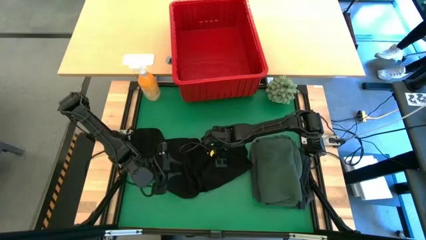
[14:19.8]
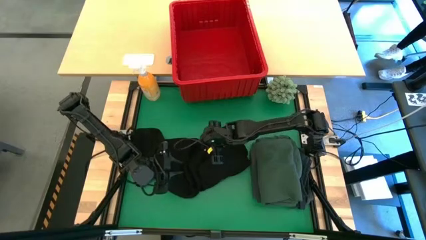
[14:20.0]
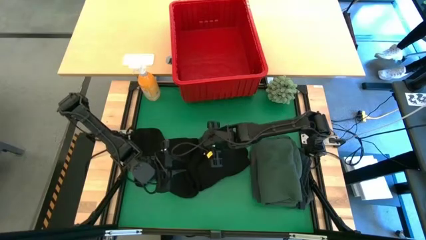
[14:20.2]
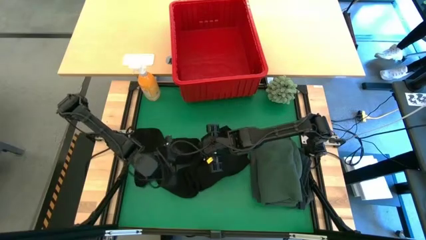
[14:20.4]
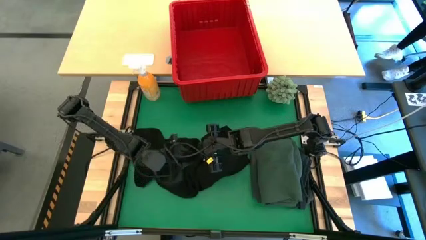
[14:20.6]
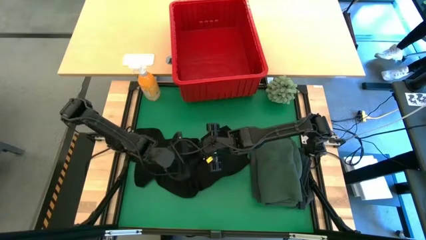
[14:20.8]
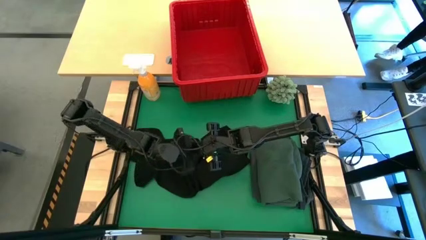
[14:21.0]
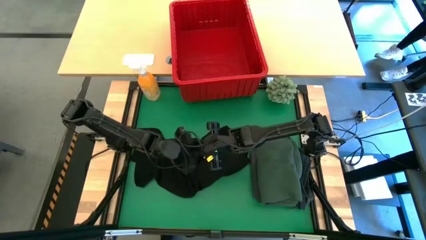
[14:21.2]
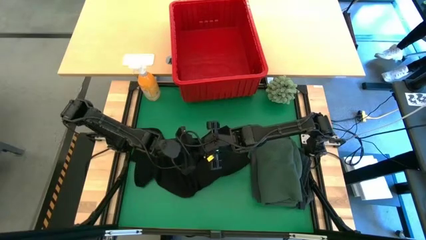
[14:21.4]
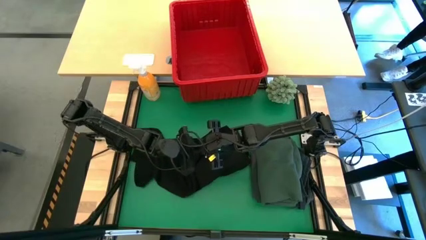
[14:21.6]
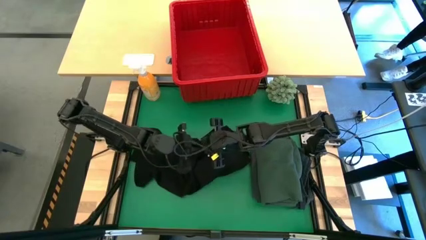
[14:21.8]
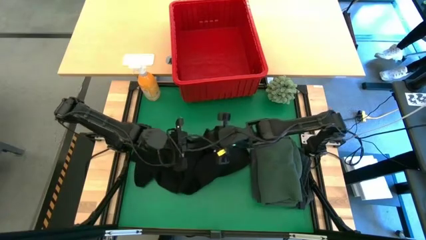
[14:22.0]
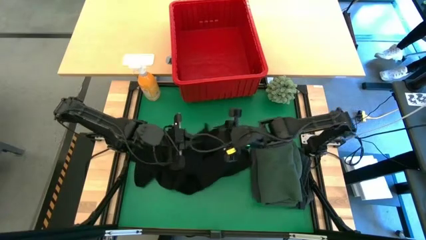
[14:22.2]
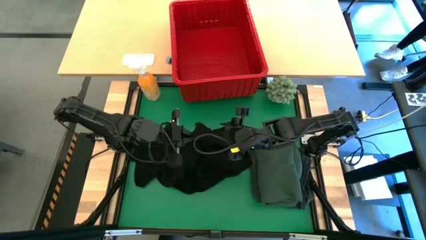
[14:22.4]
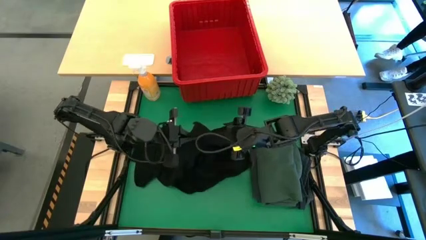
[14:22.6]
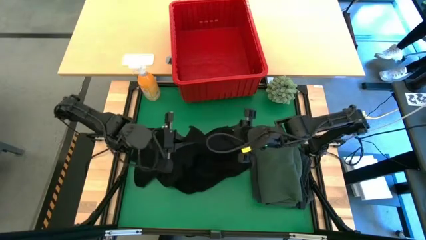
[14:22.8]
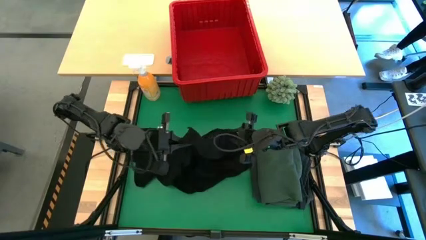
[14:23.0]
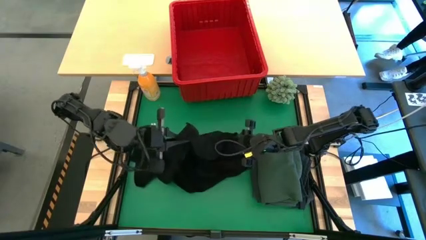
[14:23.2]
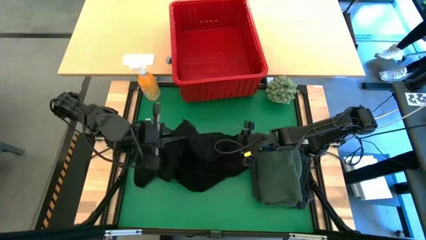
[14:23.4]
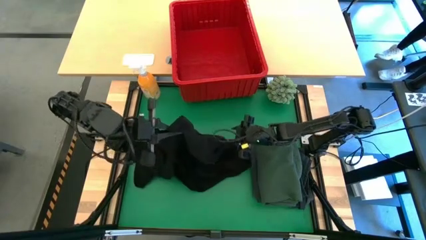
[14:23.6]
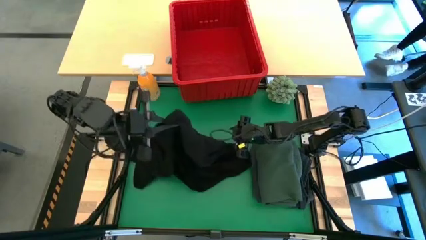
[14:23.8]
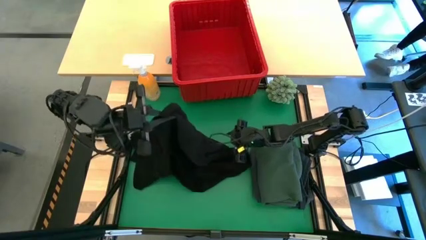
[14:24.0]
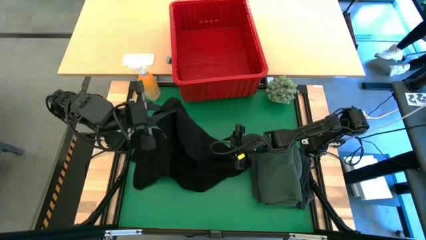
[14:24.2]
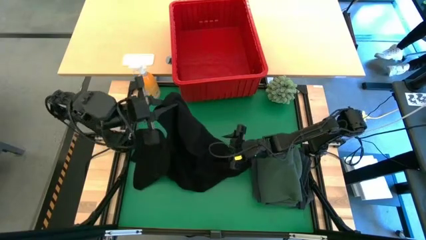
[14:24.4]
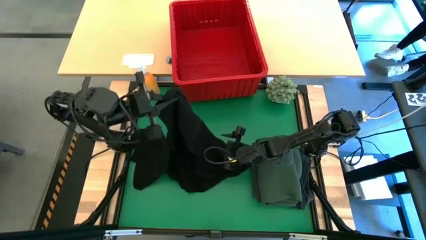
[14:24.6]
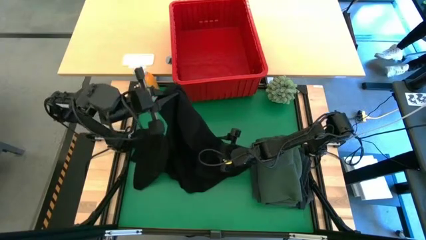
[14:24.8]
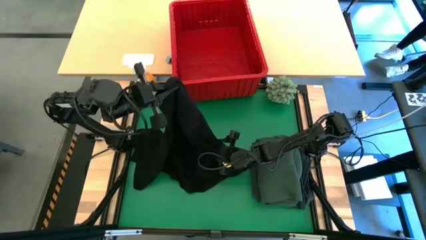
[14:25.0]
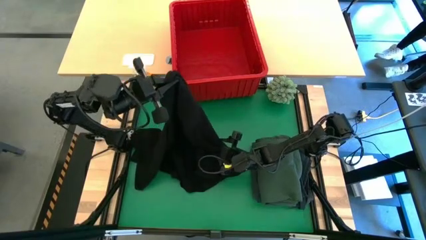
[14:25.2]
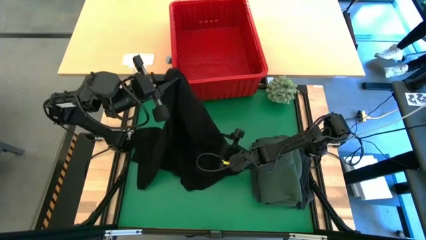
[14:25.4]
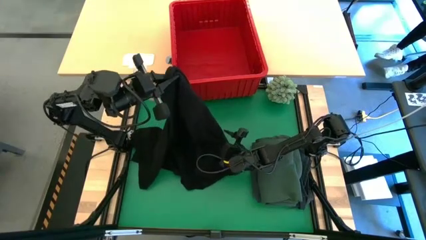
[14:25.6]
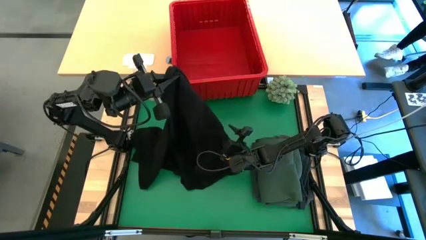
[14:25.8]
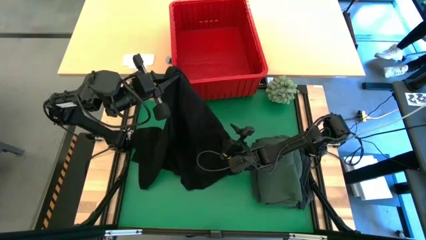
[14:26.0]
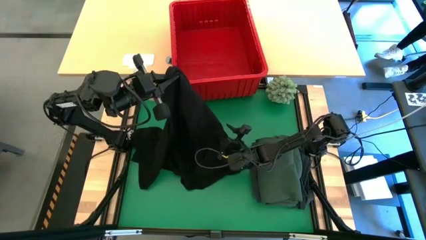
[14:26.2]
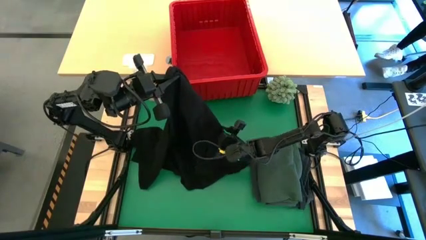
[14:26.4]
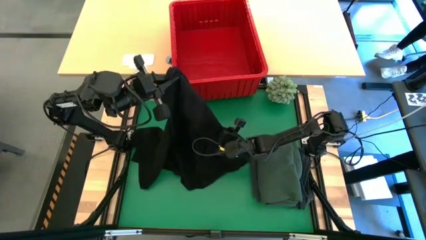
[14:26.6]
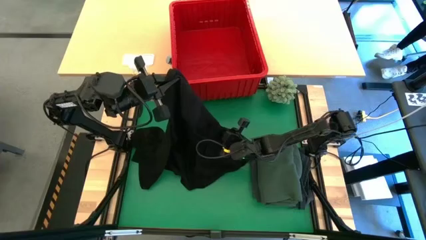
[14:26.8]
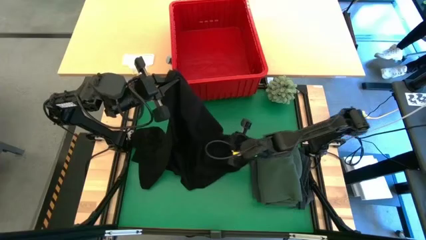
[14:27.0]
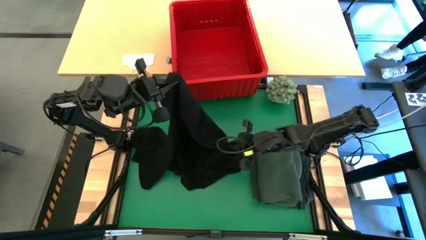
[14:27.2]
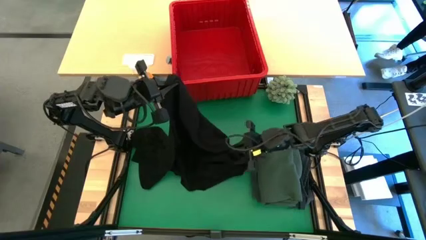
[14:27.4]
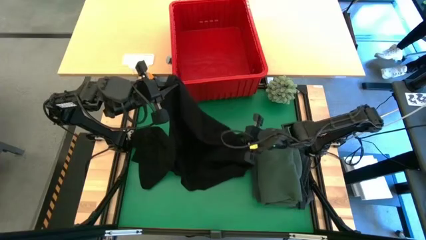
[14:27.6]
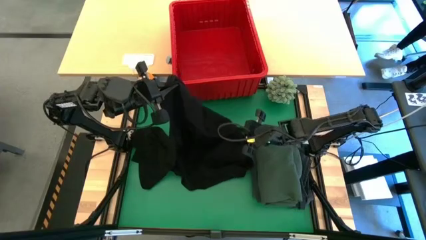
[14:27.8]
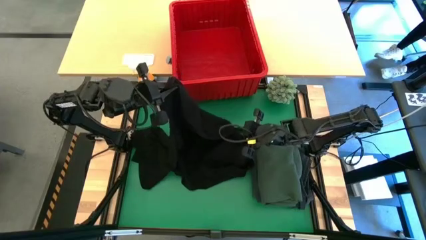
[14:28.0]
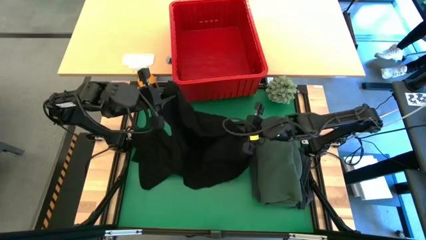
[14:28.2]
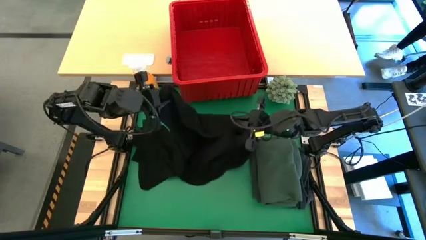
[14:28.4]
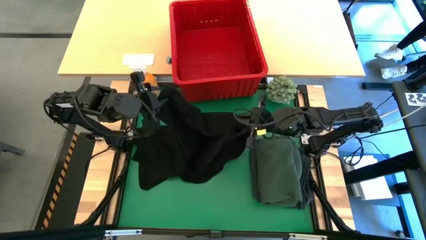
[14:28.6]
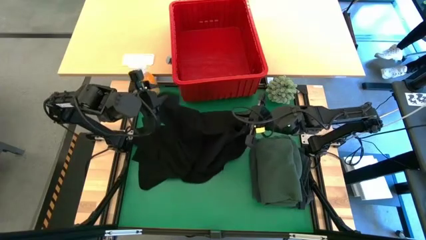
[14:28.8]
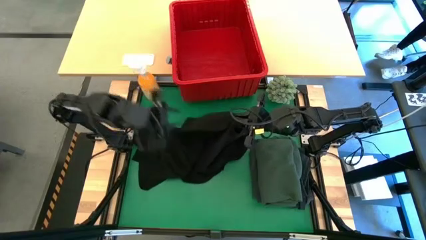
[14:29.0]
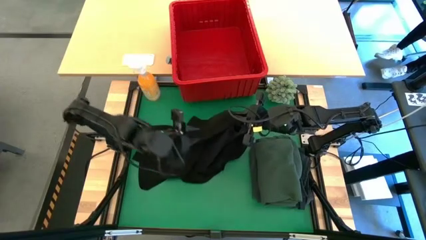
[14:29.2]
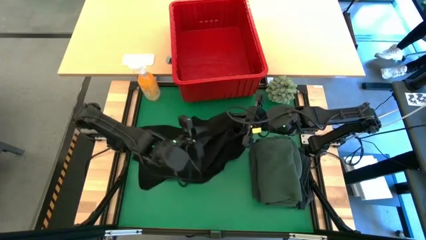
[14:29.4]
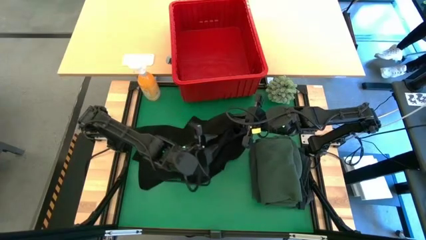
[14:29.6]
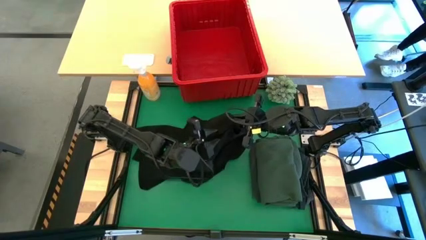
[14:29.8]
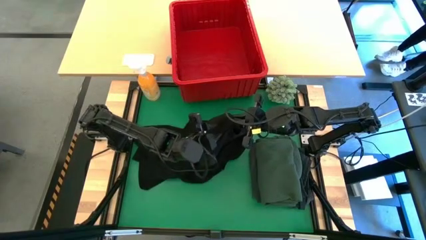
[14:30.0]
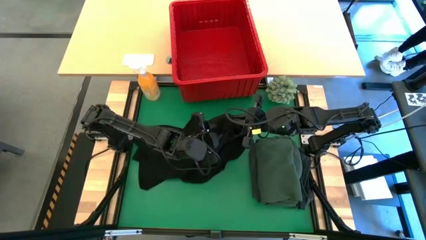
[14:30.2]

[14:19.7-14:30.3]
Task: Fold Laundry from Bin
Fold the black shirt

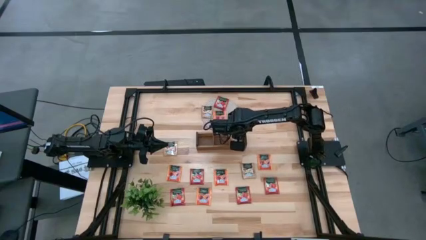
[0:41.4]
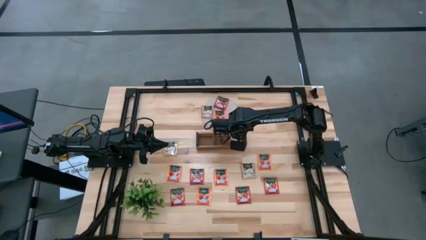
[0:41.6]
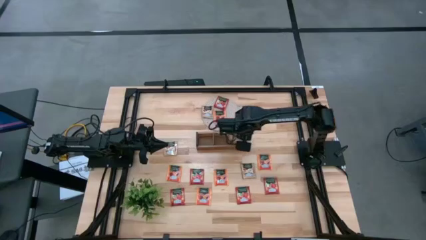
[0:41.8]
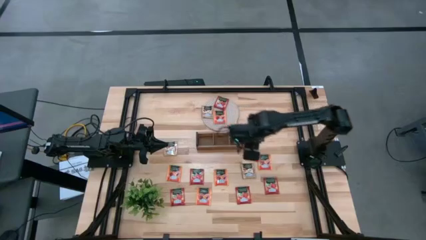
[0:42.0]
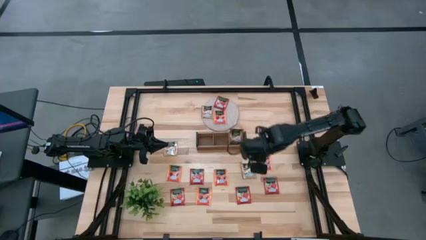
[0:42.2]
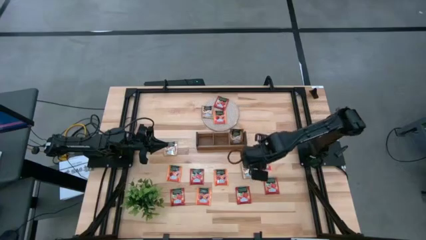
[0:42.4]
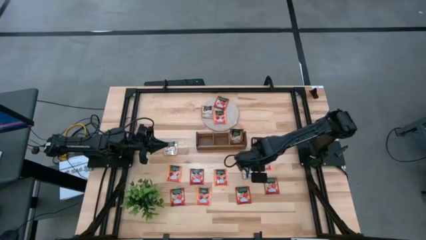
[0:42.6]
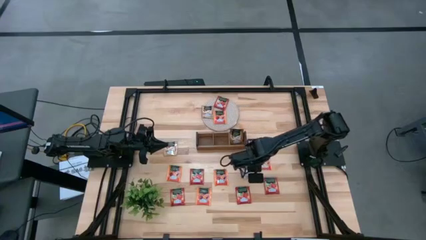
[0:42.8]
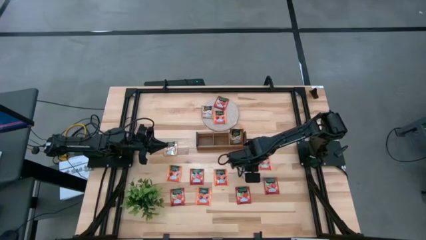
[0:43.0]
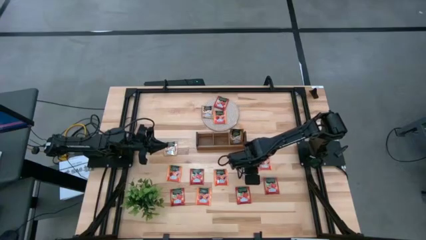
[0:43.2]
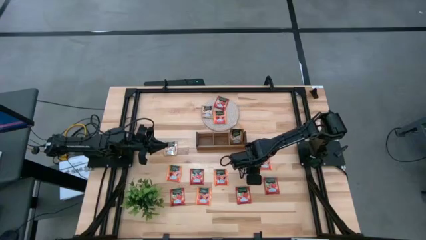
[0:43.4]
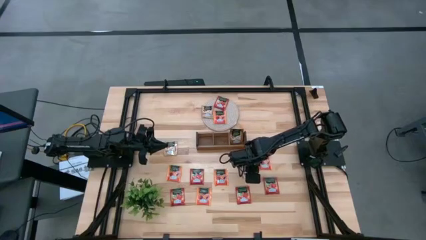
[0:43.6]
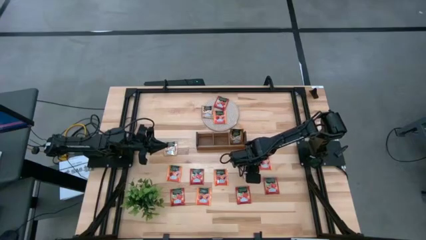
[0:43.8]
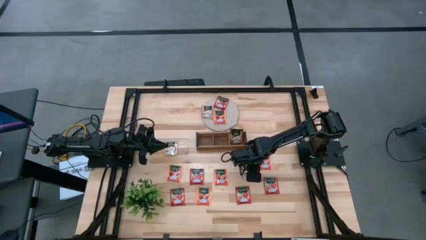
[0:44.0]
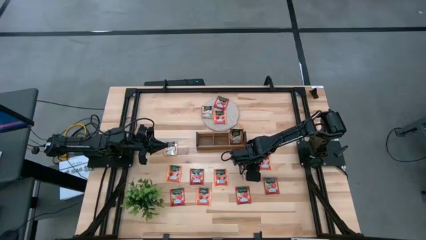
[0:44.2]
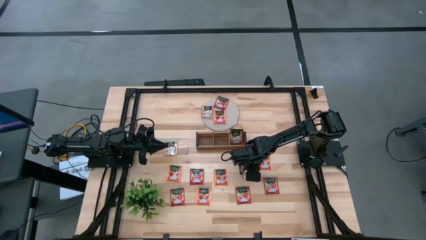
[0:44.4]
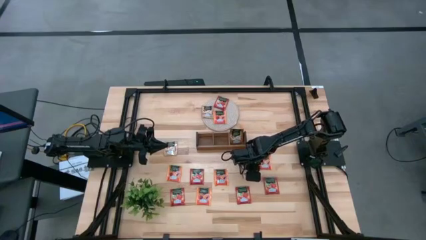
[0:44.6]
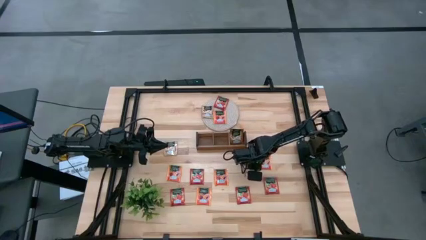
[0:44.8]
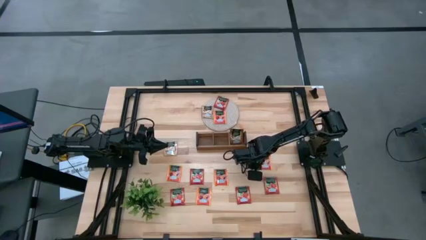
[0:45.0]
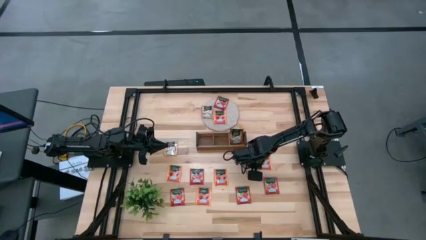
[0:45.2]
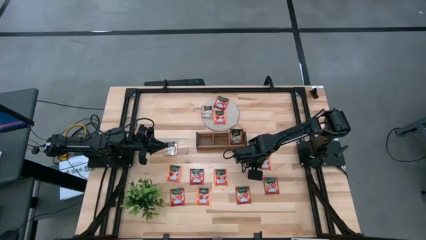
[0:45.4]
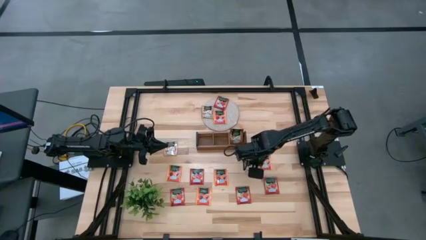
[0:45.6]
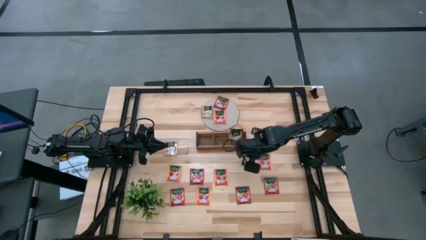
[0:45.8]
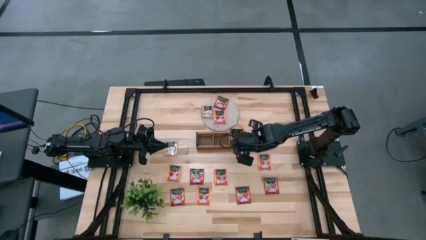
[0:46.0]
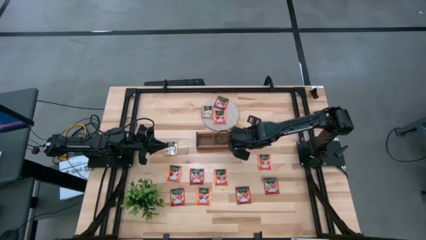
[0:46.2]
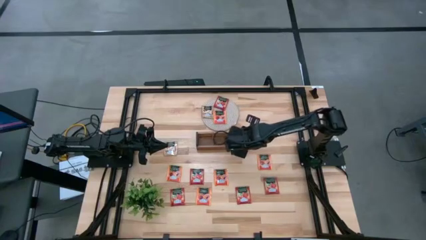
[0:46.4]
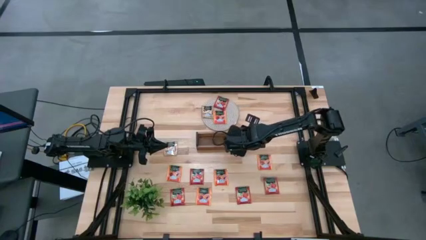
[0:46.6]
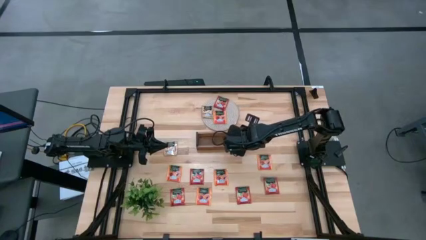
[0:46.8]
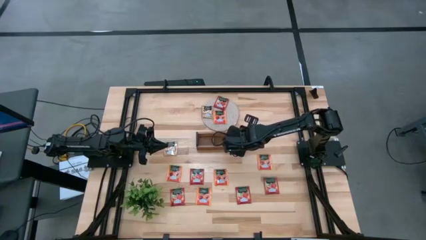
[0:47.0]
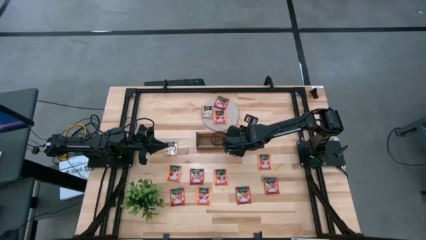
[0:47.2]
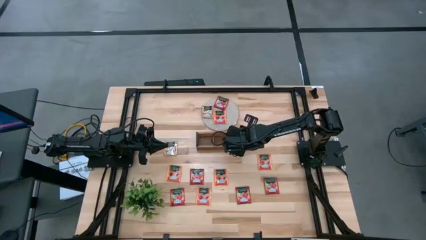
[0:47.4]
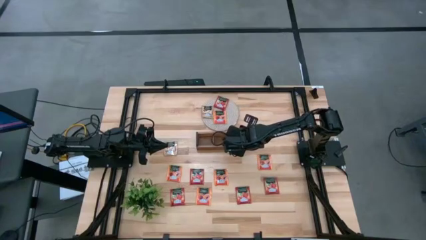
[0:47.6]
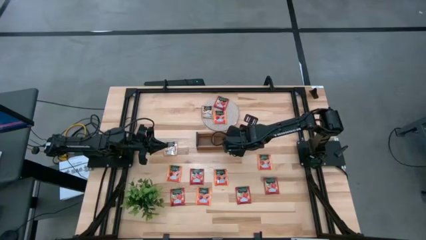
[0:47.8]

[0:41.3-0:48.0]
Task: Pick & Place Tea
Put the brown tea bag into the right section of the wooden organizer
